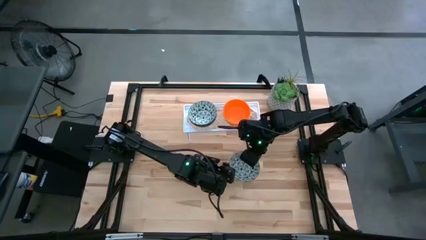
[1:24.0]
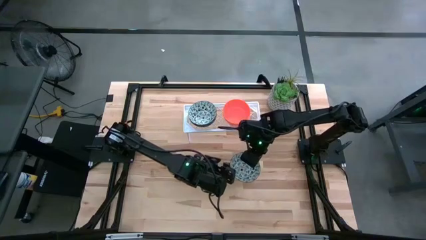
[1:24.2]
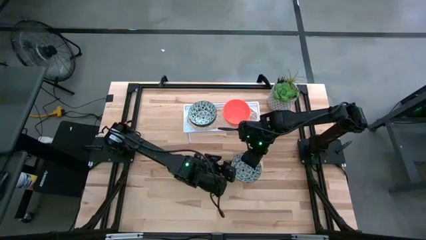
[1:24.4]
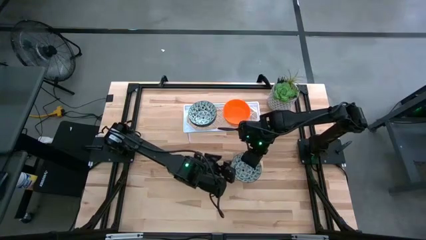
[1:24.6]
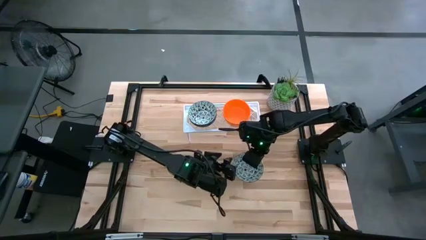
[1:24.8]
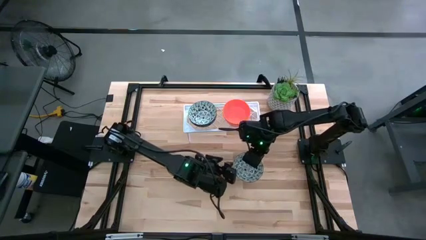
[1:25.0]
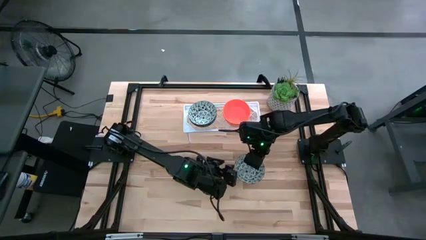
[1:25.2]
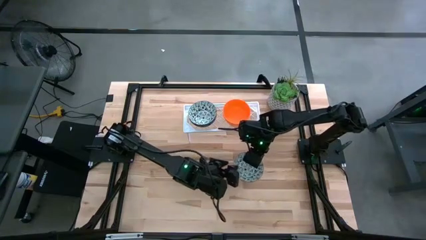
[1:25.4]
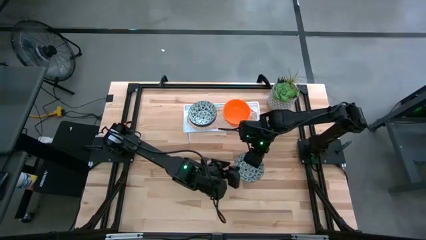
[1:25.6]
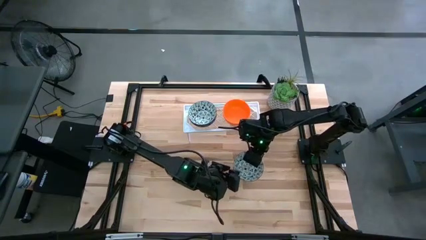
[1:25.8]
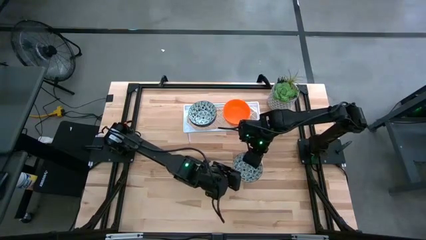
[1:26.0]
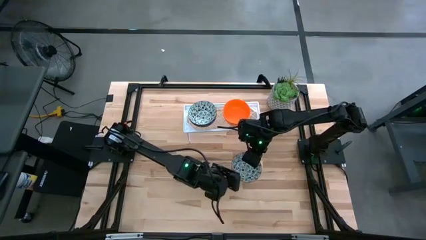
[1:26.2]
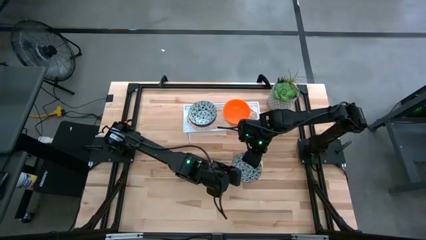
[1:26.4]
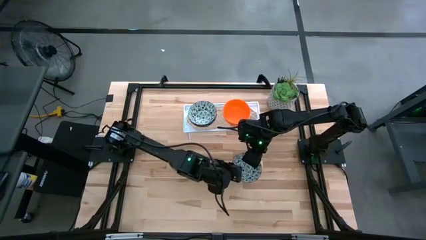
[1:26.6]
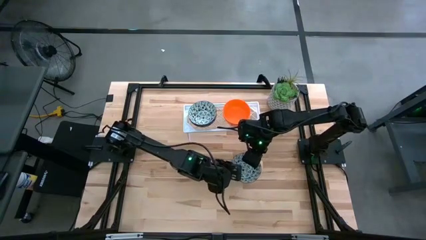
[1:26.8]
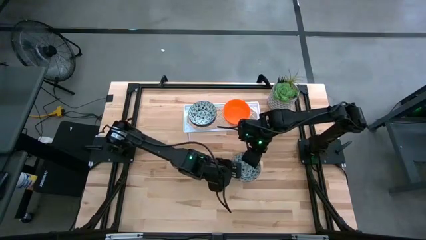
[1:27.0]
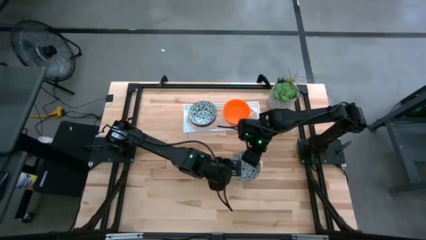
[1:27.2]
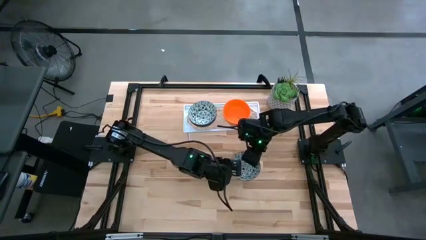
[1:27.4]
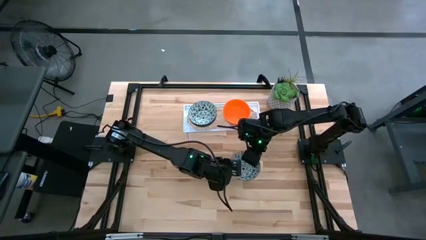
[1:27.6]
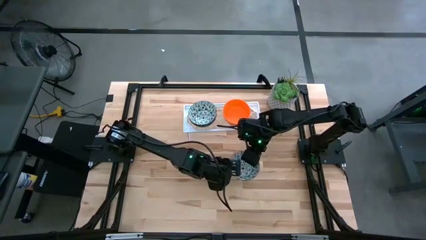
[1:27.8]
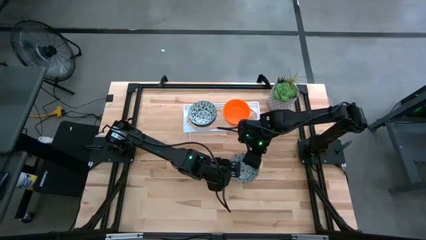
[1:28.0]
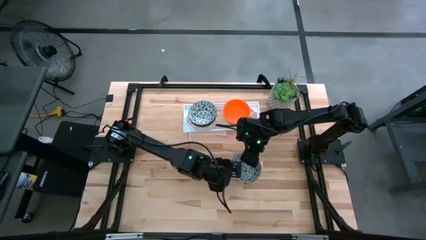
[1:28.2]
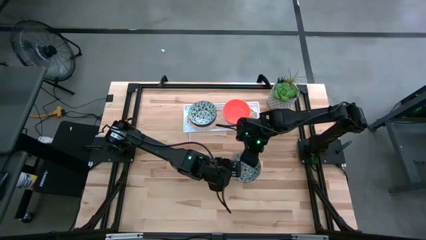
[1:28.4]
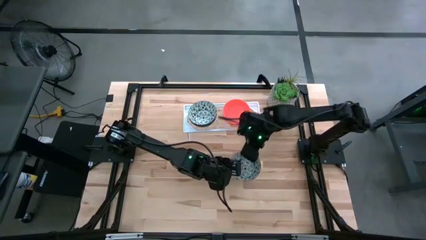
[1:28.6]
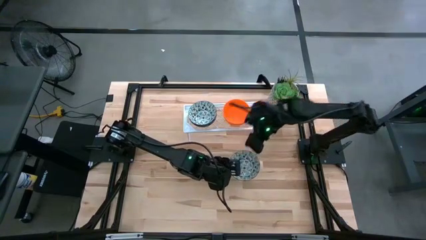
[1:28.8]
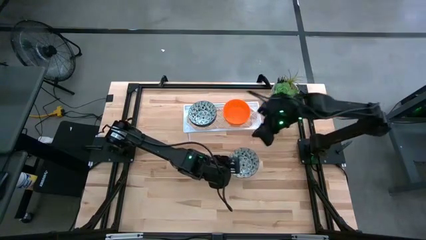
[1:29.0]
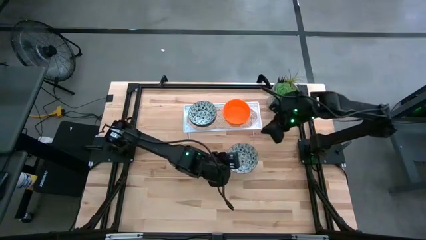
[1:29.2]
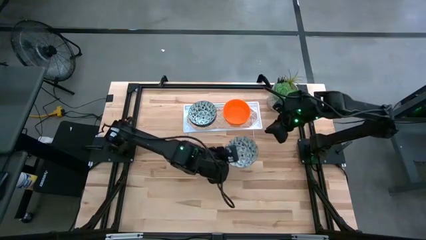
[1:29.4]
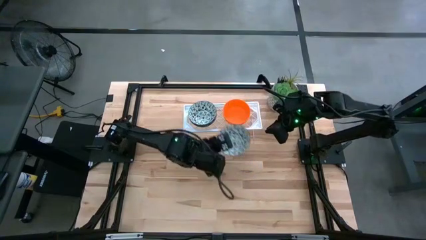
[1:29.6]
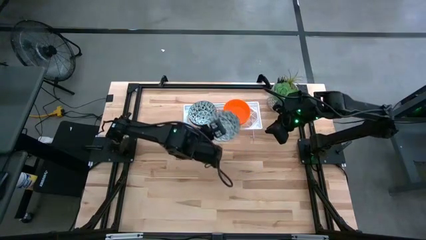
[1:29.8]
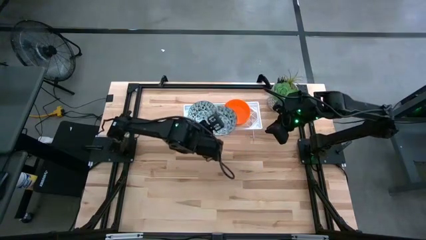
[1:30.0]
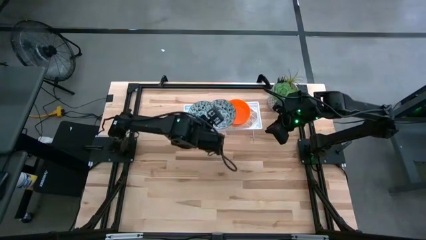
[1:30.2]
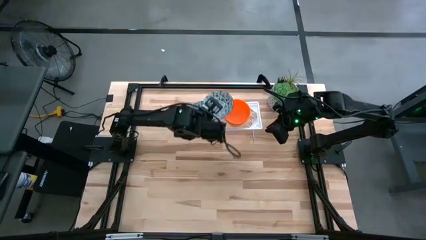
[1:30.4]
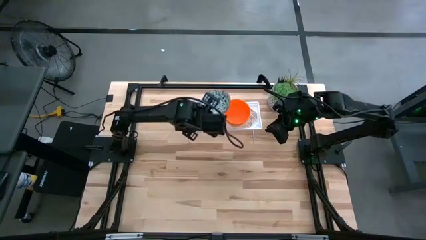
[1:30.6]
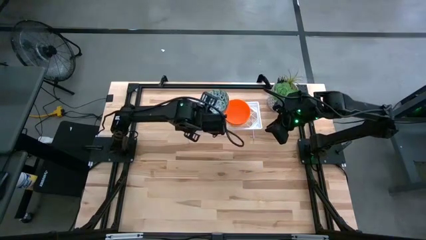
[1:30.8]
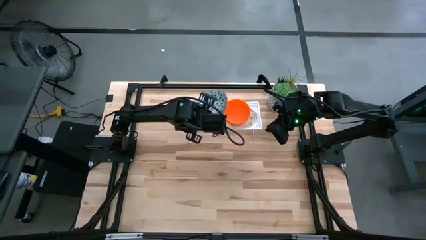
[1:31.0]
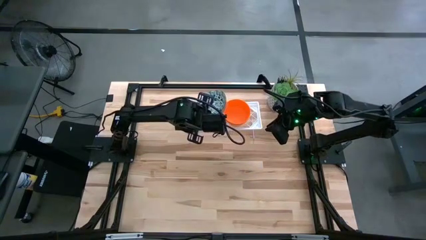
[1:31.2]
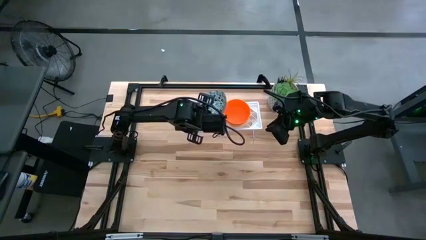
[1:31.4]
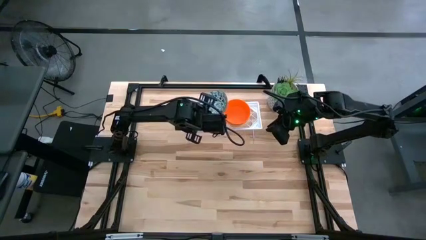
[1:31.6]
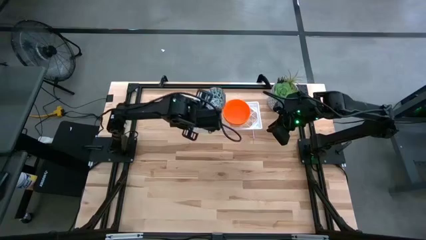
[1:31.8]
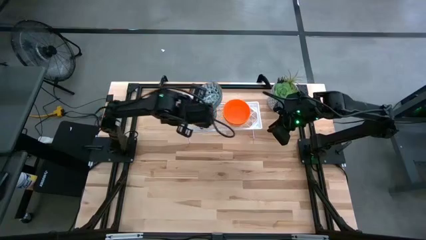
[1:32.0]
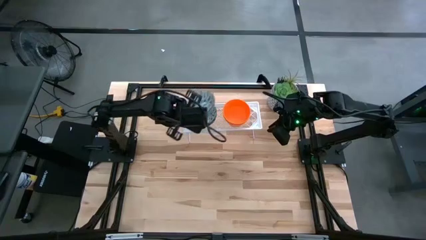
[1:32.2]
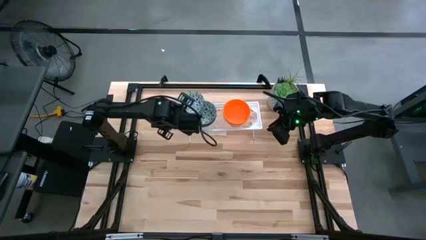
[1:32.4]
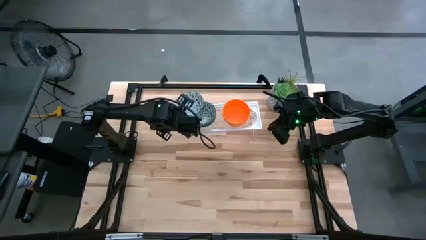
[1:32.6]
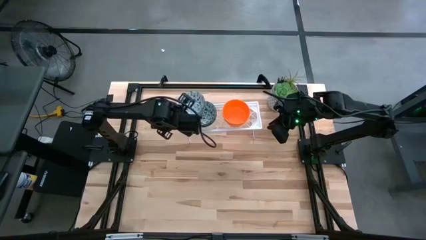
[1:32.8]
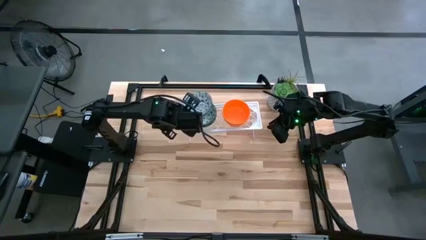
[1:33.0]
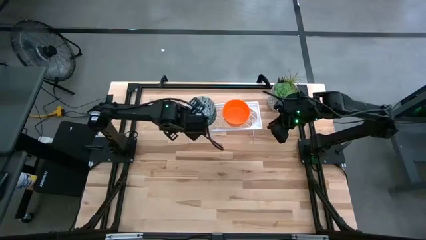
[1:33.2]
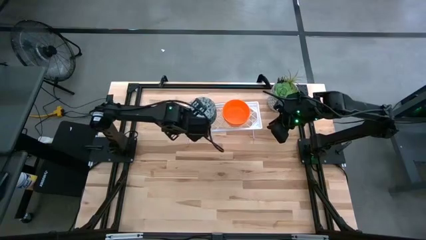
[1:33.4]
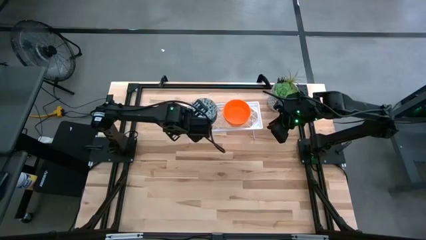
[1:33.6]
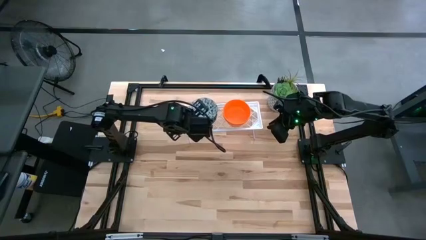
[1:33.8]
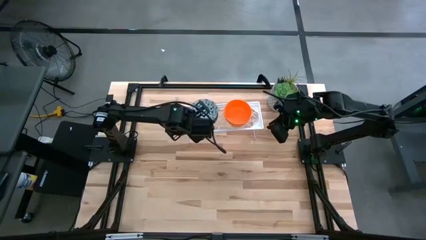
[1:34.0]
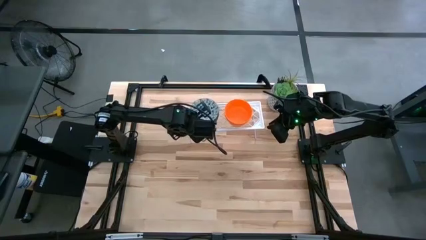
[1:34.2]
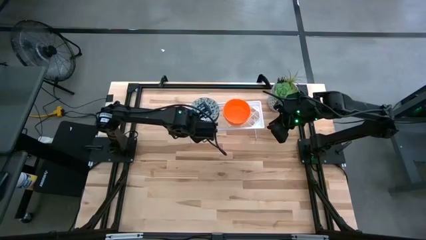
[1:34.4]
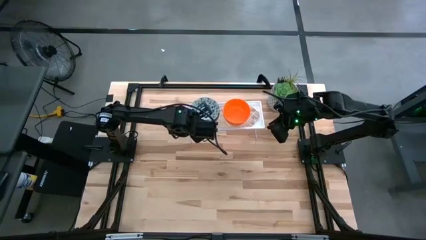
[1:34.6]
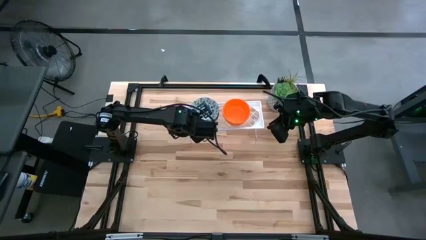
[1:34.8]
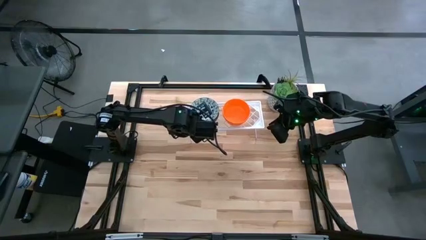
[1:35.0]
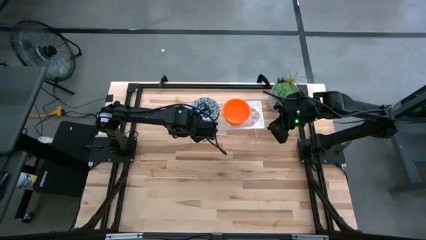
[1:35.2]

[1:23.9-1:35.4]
Task: Pick & Place Mini bowls
Stack the blue patterned bowl on top of the other blue patterned bowls on the shelf

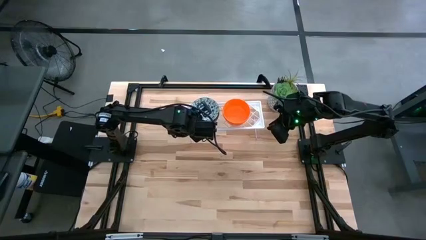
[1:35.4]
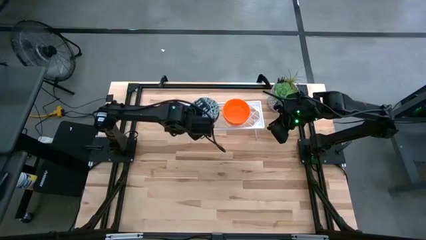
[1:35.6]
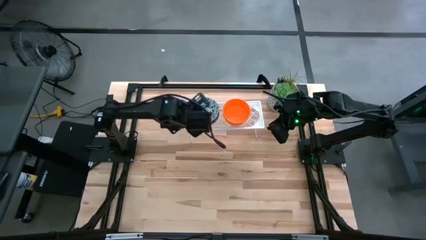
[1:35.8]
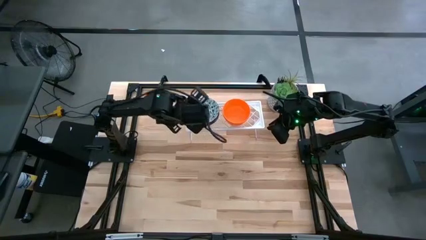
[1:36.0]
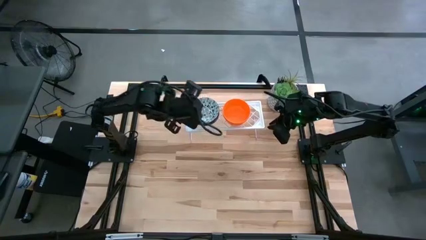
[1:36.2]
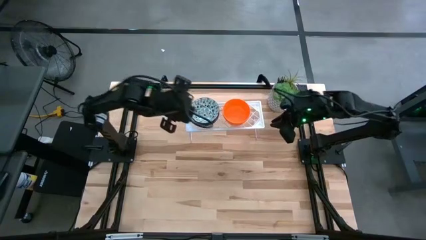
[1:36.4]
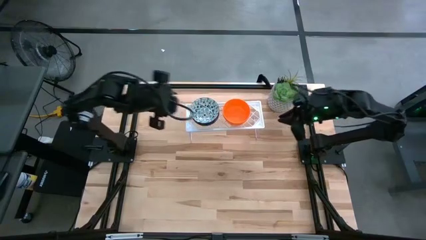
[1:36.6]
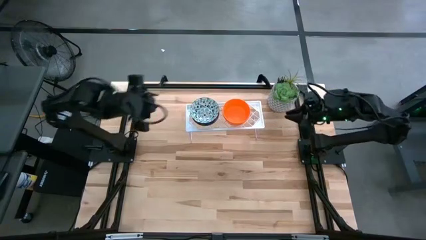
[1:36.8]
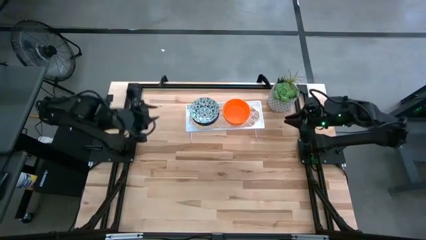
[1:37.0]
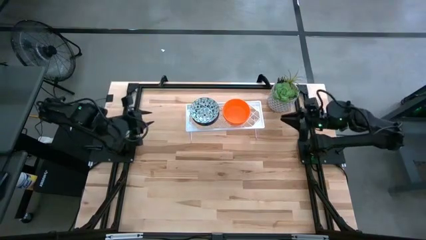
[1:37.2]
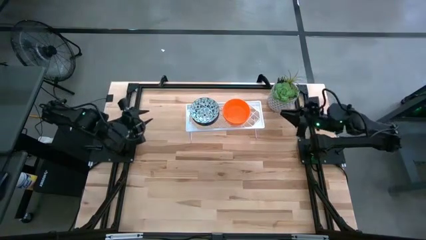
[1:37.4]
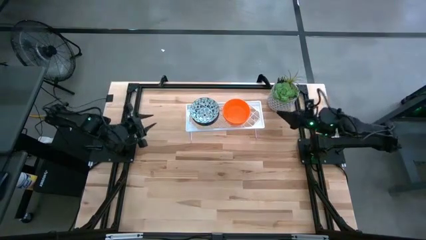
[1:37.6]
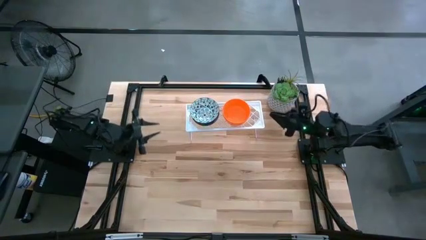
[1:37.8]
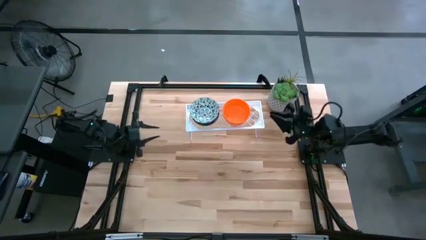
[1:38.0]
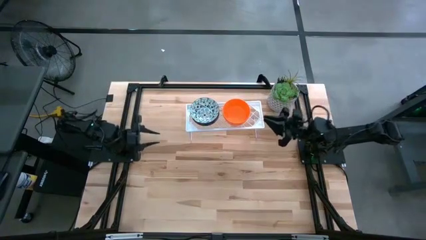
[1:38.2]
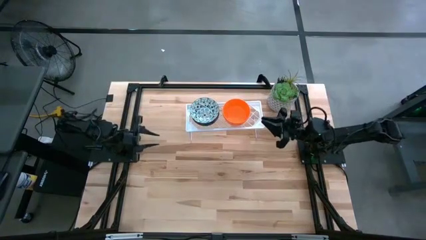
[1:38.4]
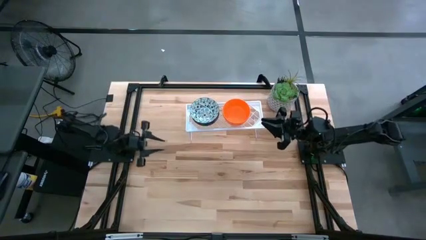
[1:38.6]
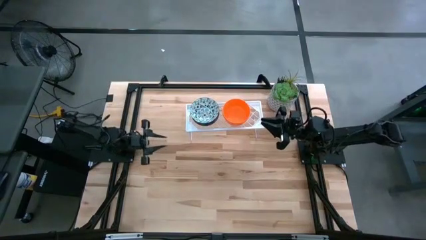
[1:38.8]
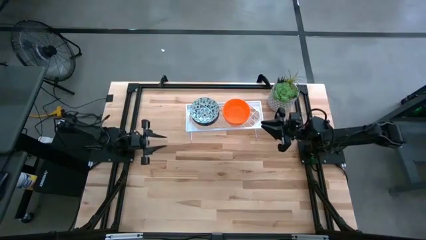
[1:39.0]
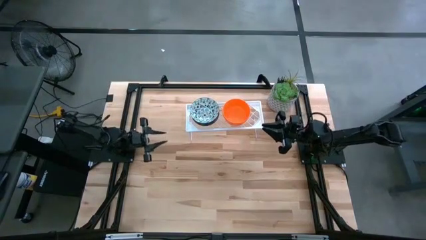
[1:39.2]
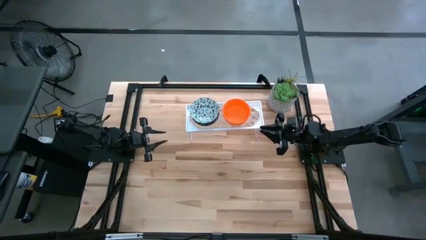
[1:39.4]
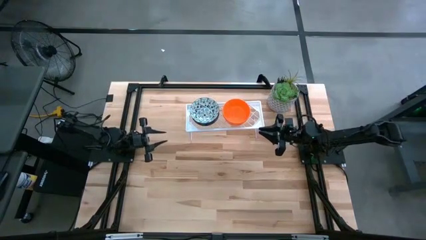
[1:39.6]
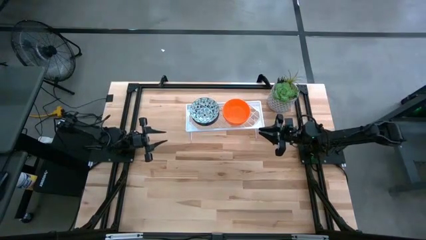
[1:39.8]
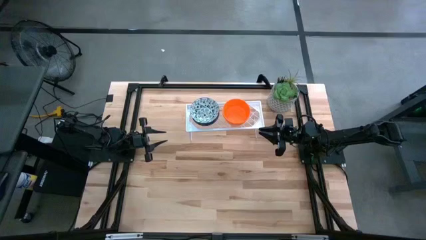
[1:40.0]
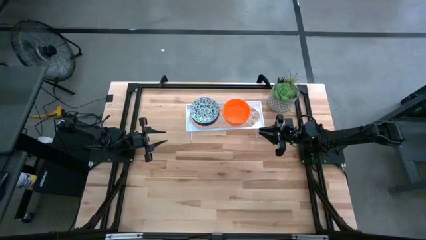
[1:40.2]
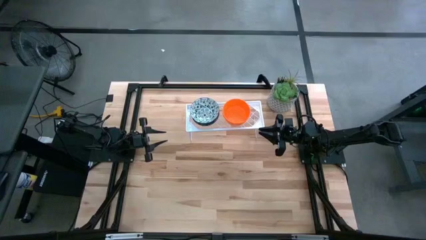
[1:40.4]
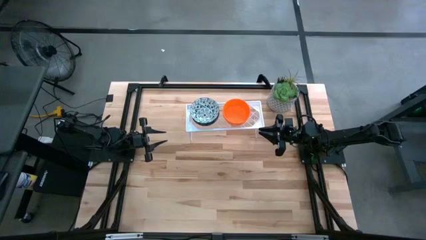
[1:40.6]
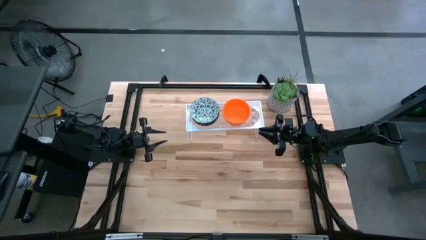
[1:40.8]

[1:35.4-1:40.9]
Return to Home Position
